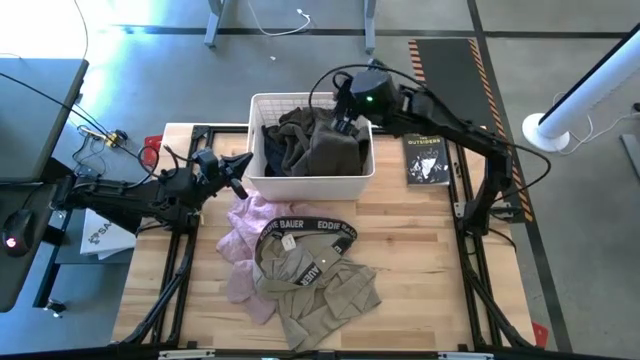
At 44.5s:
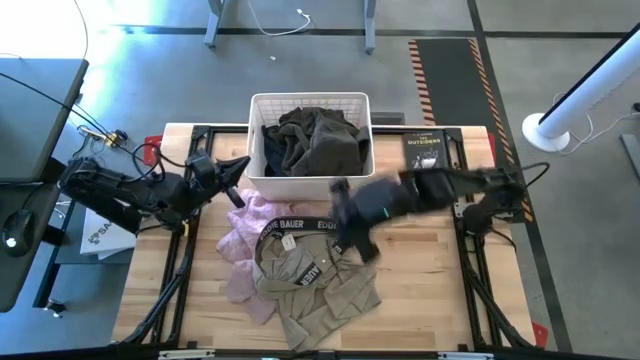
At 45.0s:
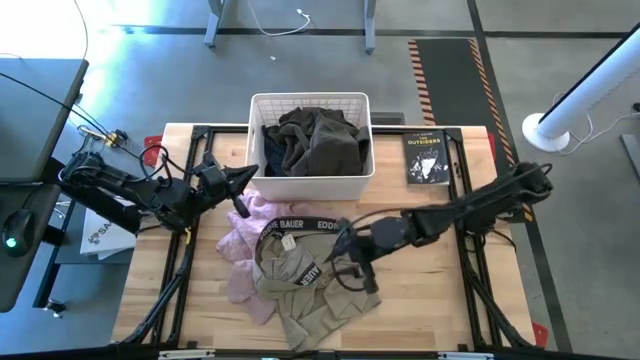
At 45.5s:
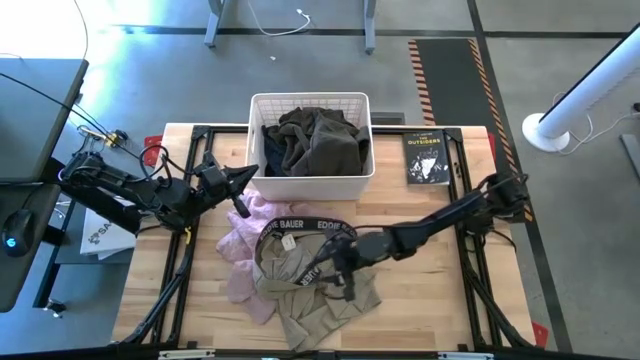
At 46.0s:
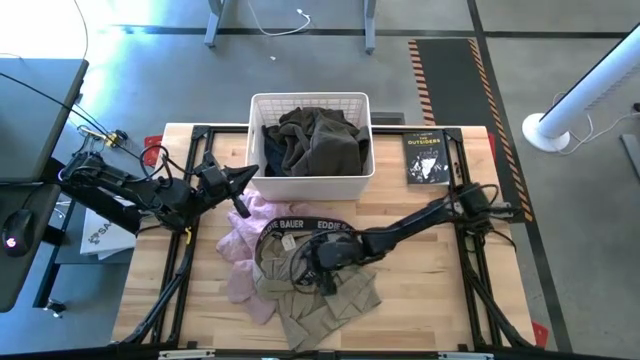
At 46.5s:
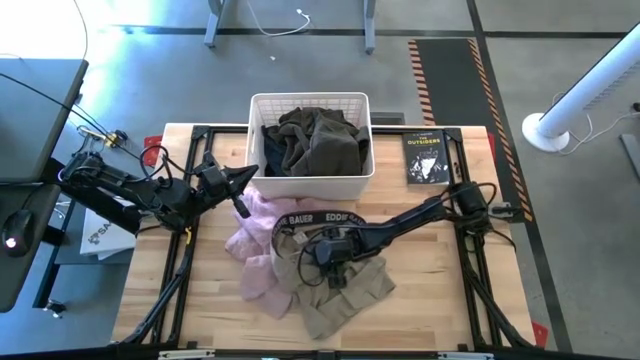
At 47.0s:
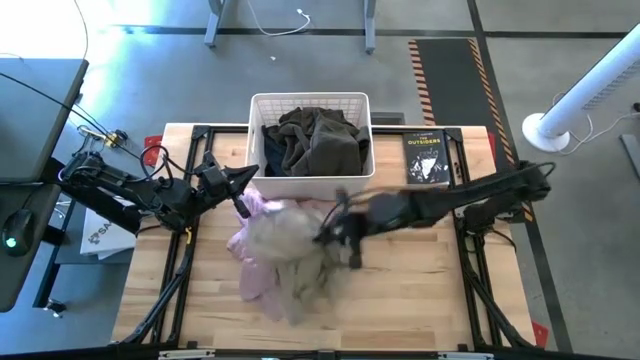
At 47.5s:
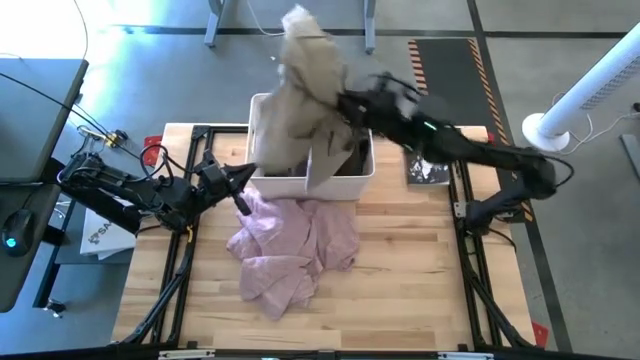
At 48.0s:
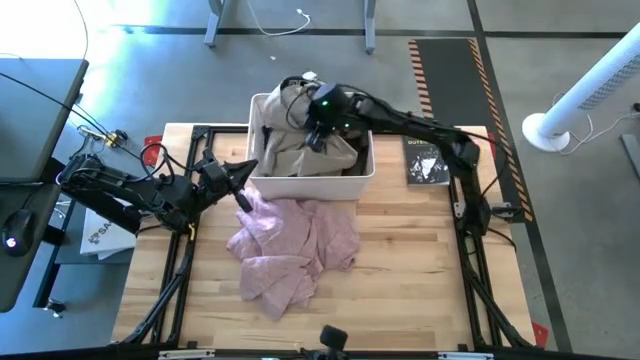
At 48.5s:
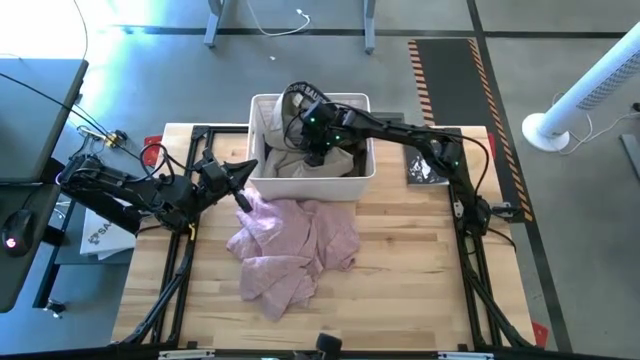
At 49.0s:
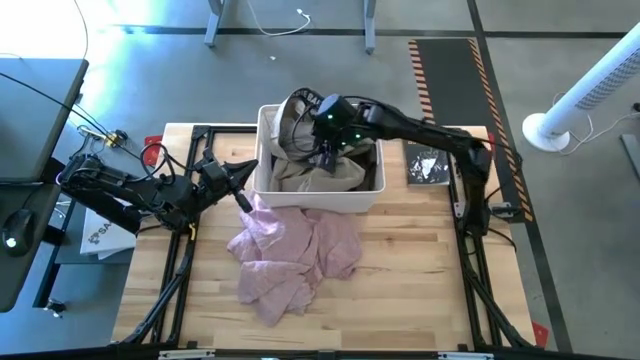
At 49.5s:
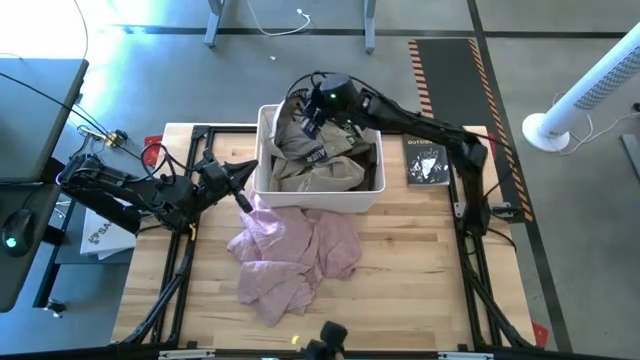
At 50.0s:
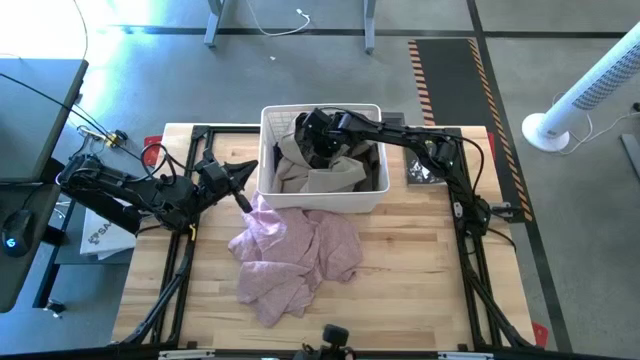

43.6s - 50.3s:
Task: Sort clothes
Put the brown short into the white bin

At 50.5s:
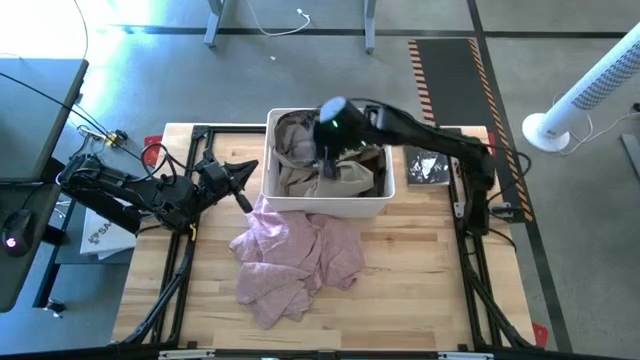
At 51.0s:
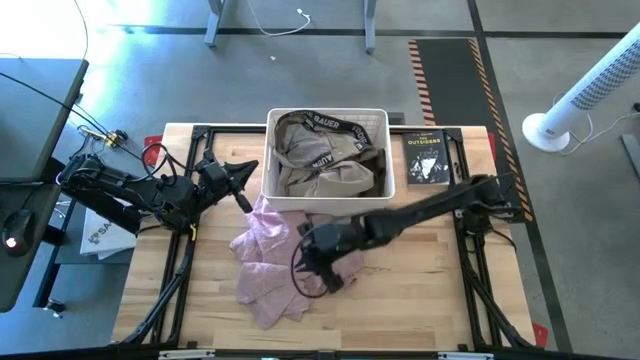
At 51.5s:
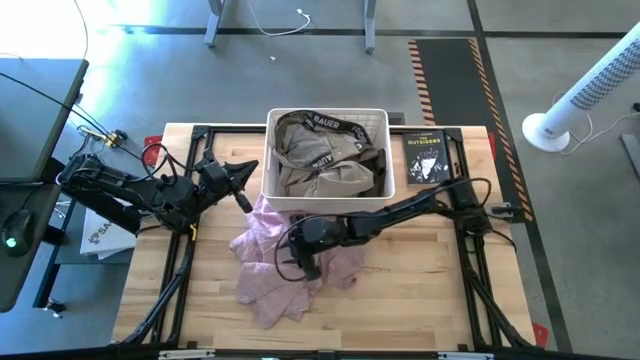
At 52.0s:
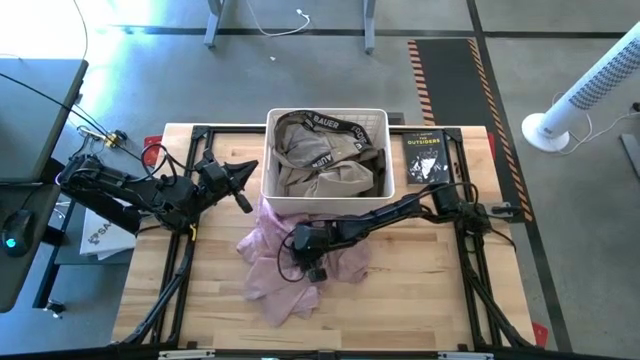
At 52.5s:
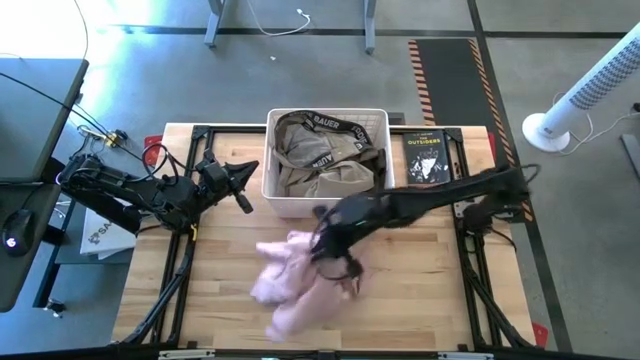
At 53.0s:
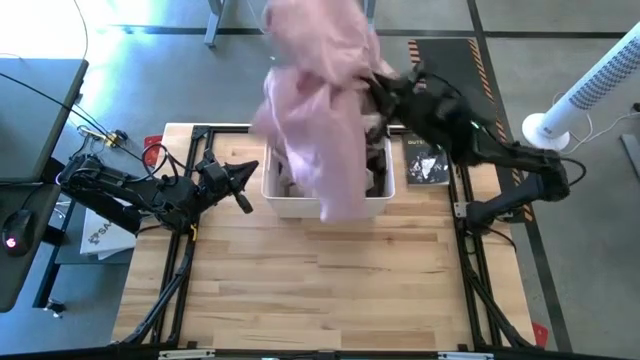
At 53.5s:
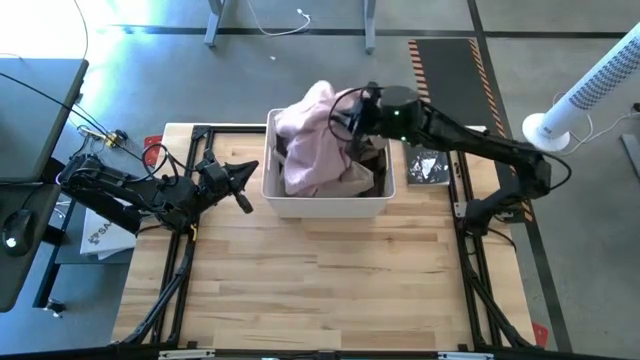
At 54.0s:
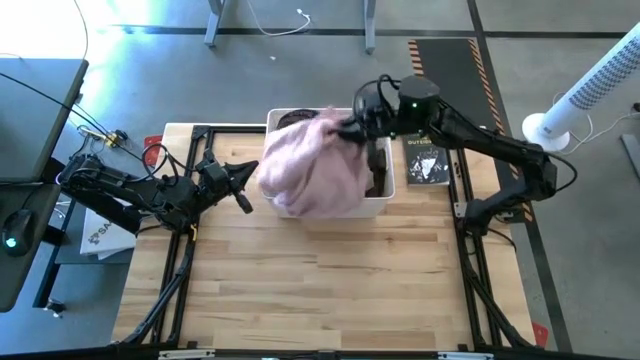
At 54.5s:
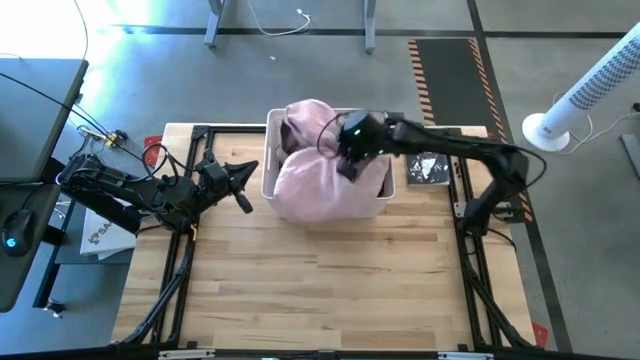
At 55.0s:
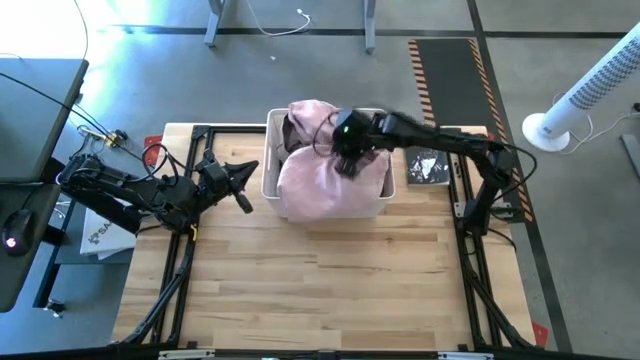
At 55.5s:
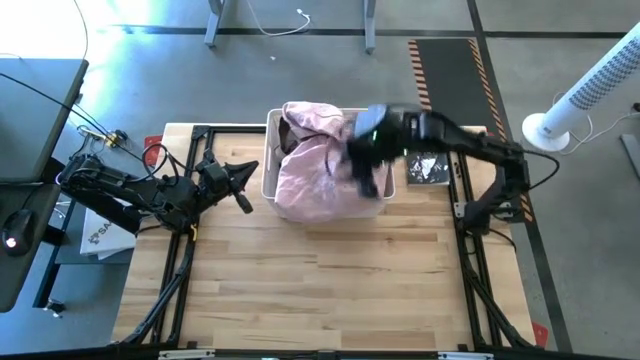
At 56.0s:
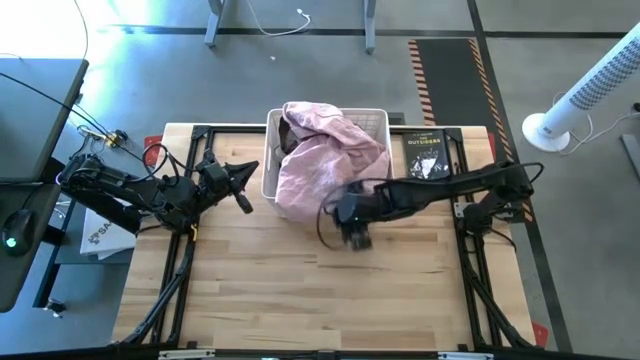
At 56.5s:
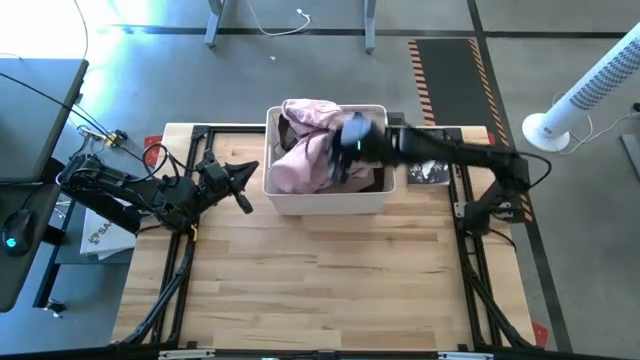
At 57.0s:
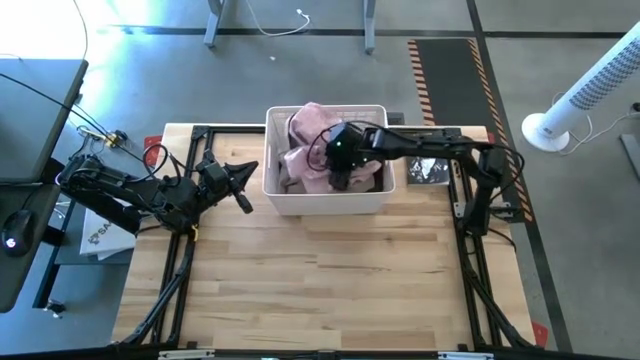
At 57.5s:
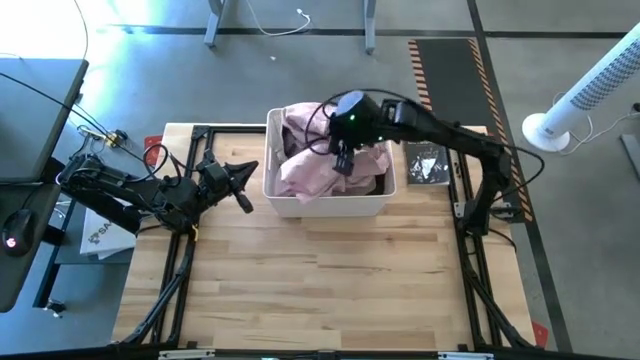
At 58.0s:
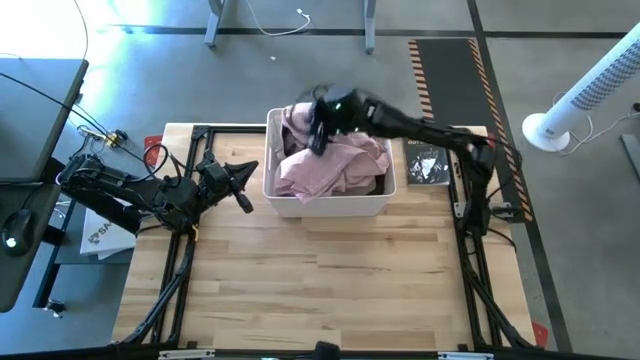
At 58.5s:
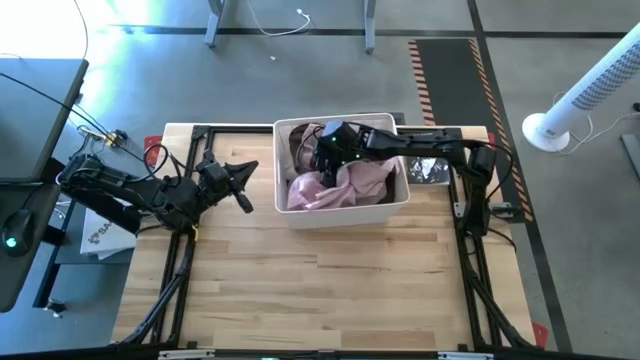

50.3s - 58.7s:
Put the pink shirt into the white bin

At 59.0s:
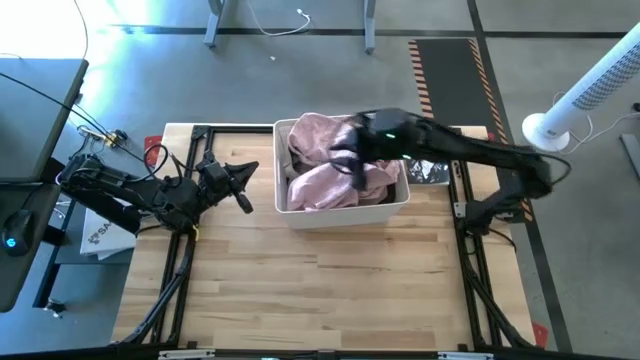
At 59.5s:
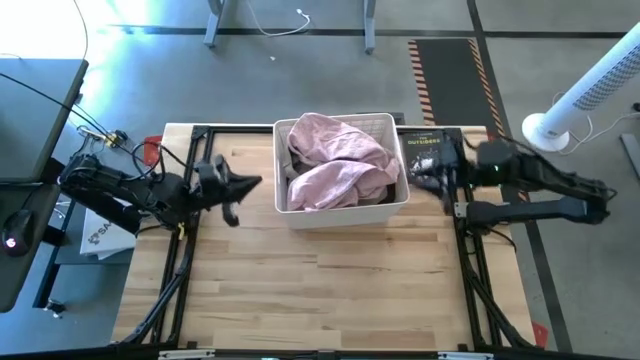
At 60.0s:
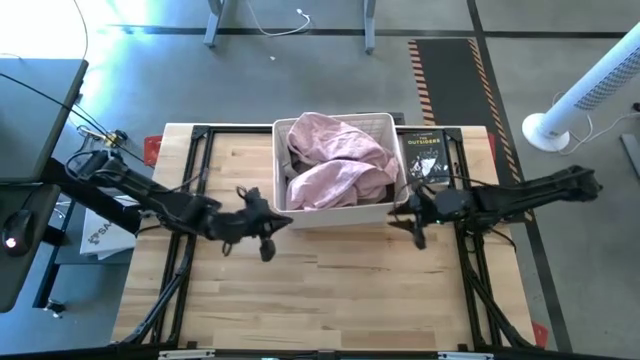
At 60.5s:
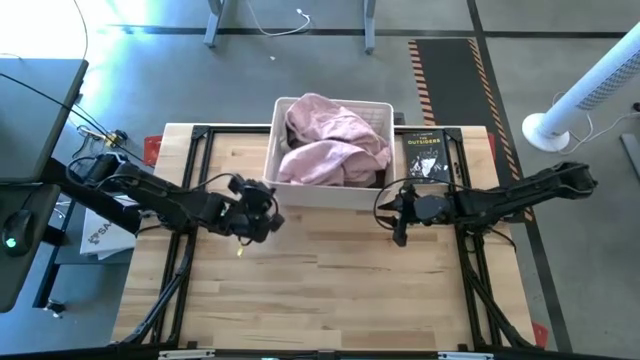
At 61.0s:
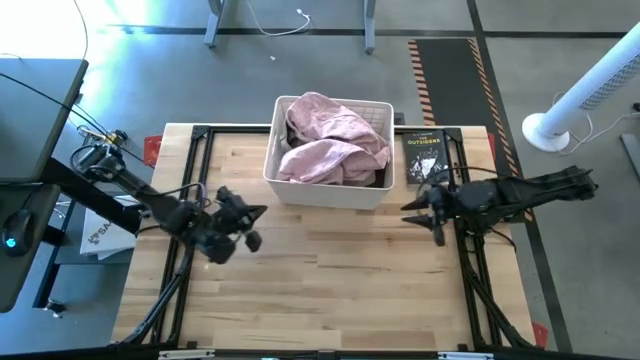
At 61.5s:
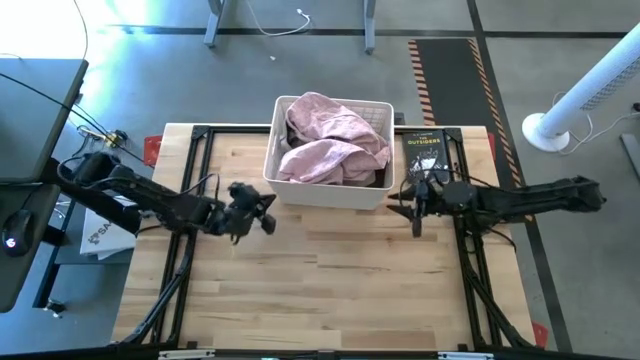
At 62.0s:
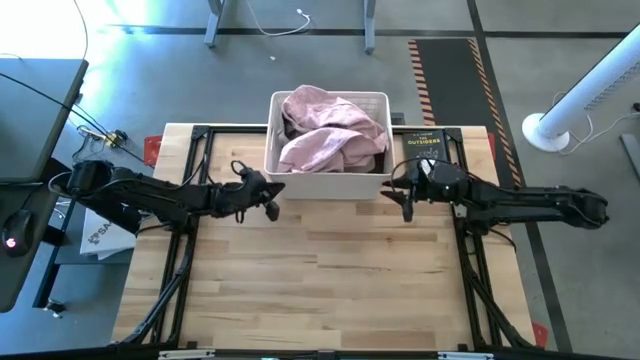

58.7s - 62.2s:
Adjust the white bin

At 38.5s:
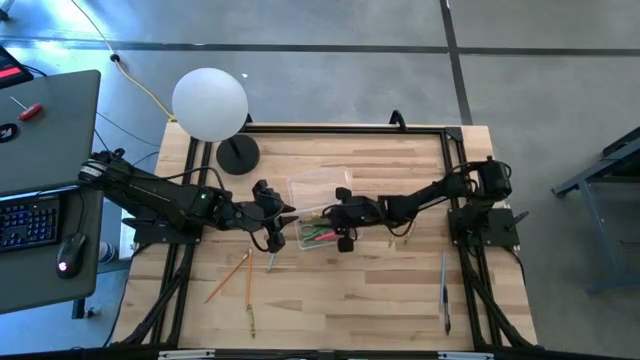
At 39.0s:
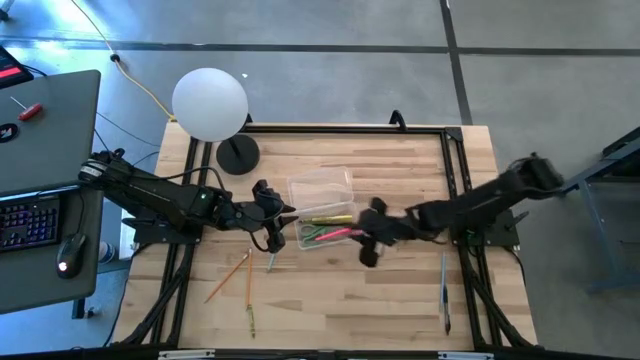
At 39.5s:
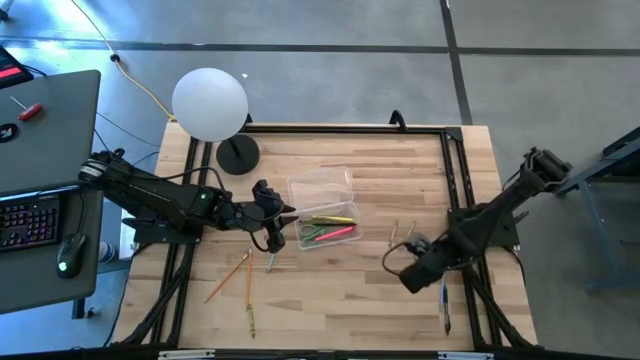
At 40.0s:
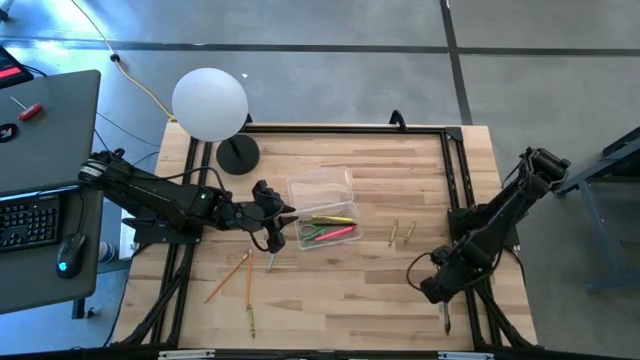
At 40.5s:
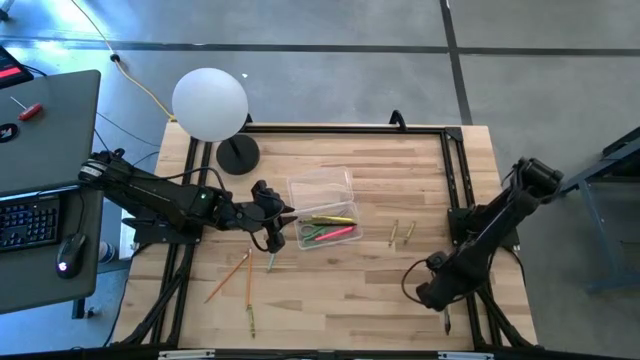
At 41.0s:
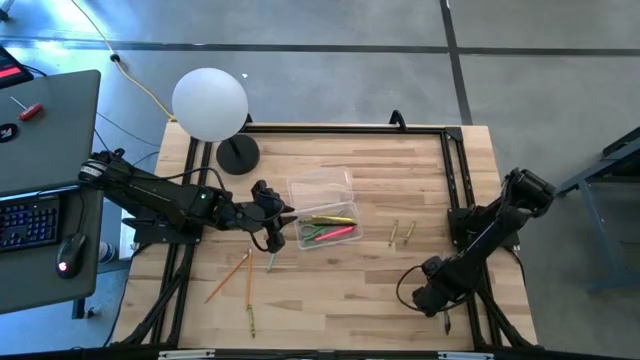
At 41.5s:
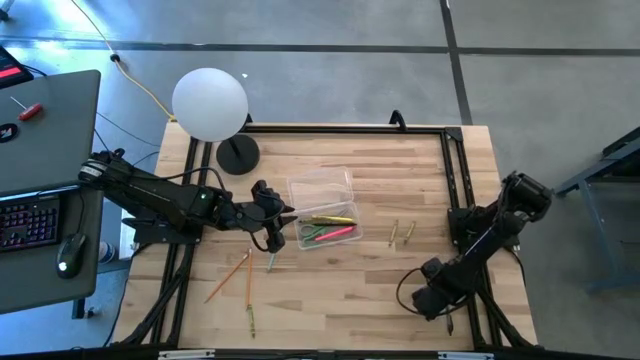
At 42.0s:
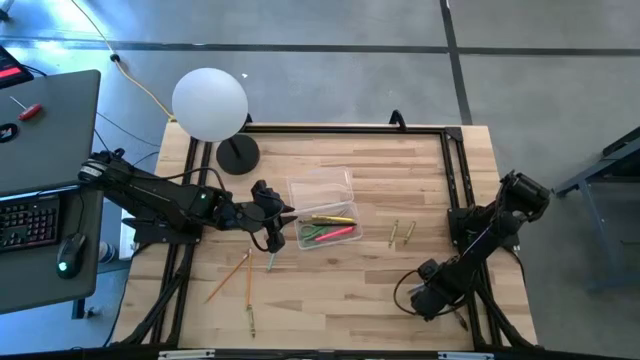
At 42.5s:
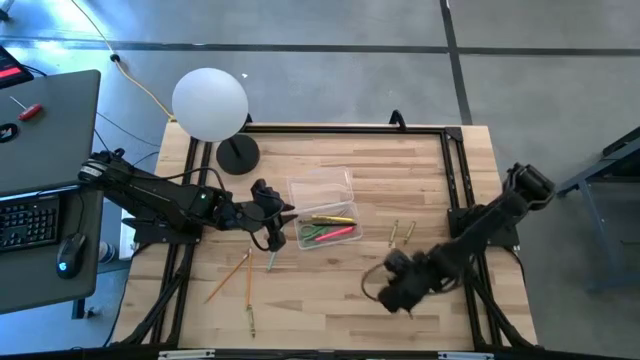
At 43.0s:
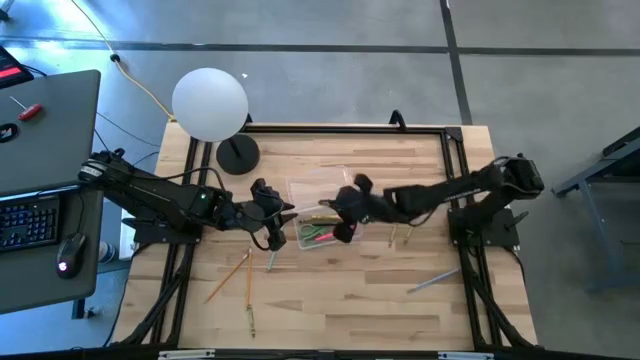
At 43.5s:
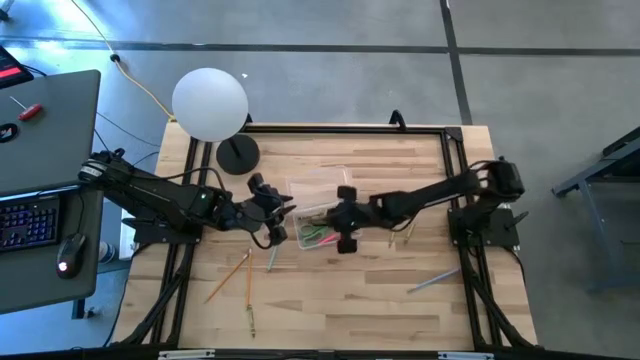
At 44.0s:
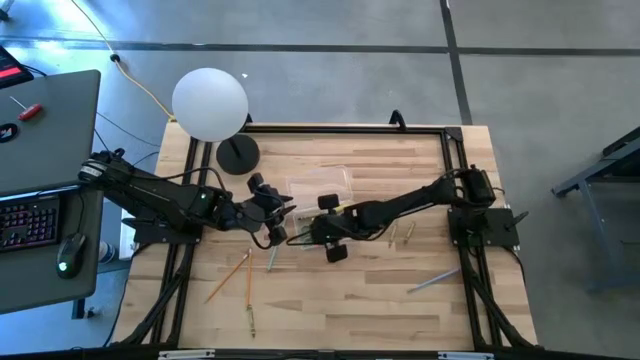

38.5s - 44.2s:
Task: Pick & place school supplies into a supply box
Put the black pen into the transparent supply box
